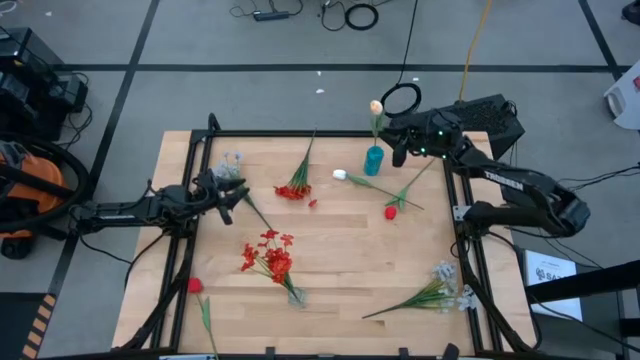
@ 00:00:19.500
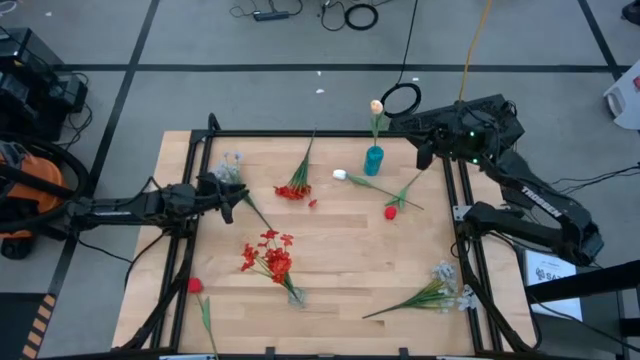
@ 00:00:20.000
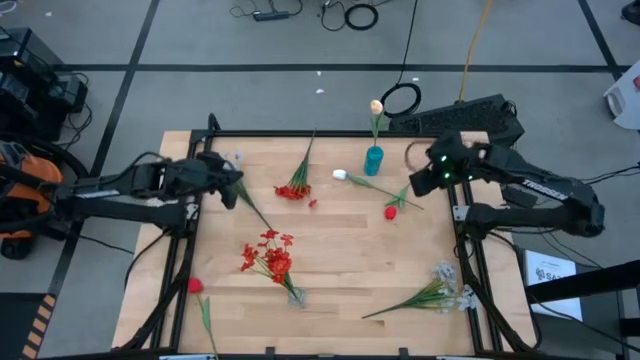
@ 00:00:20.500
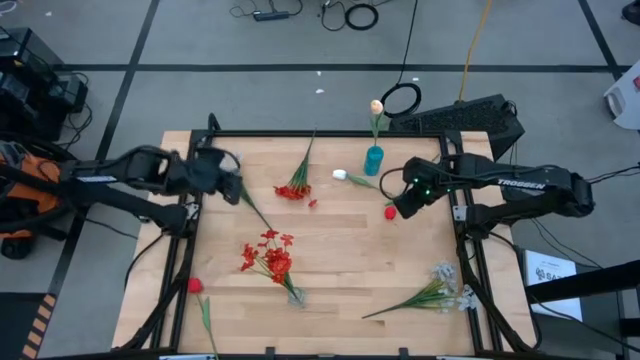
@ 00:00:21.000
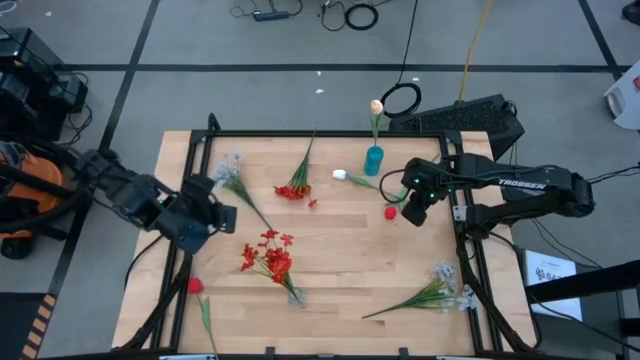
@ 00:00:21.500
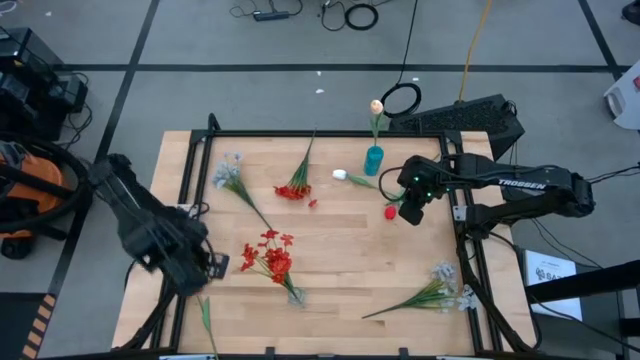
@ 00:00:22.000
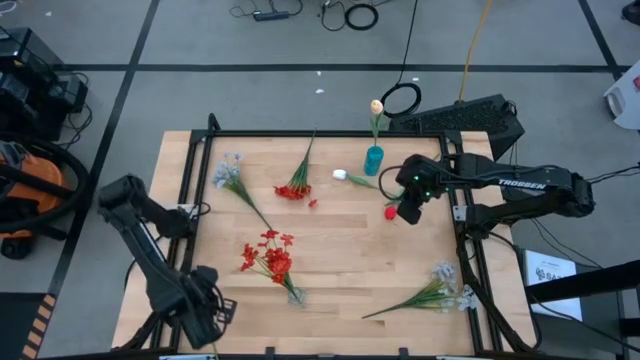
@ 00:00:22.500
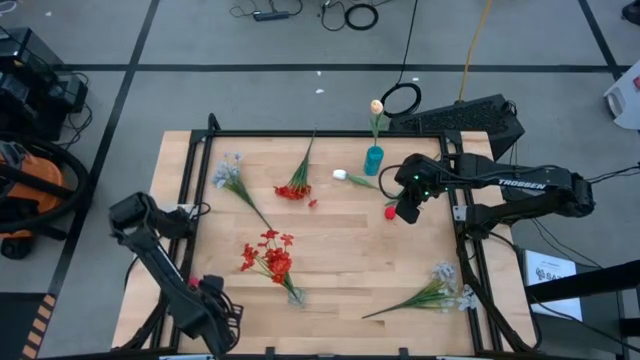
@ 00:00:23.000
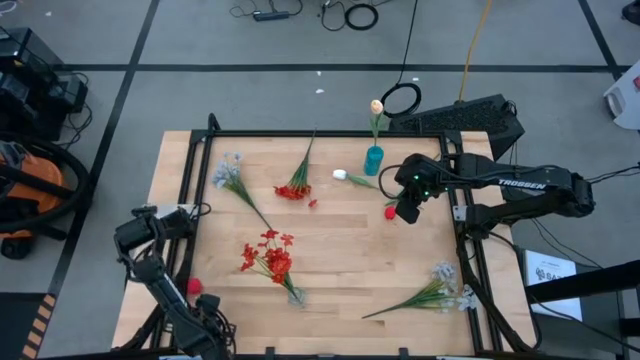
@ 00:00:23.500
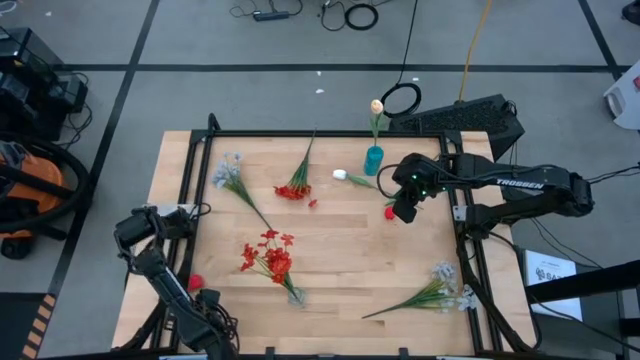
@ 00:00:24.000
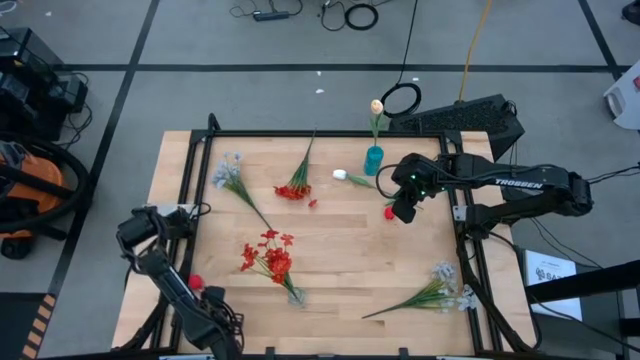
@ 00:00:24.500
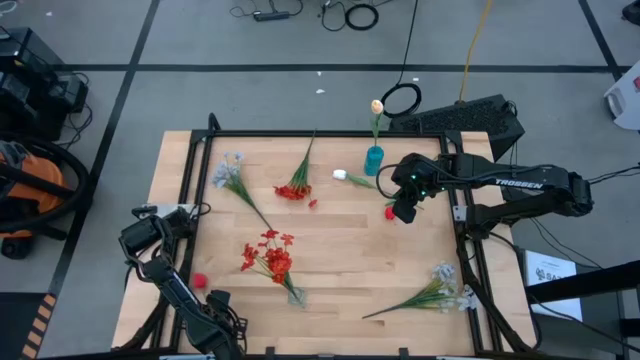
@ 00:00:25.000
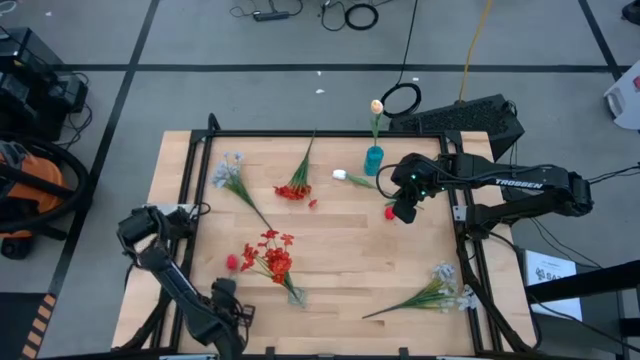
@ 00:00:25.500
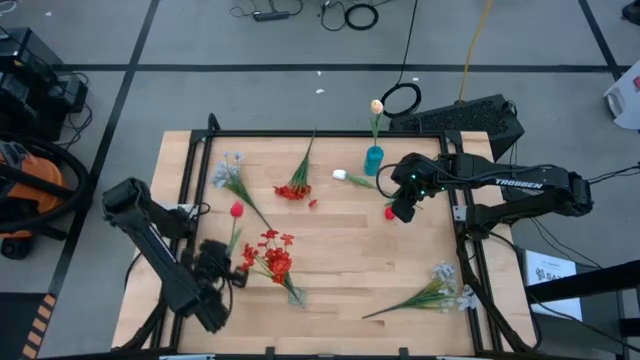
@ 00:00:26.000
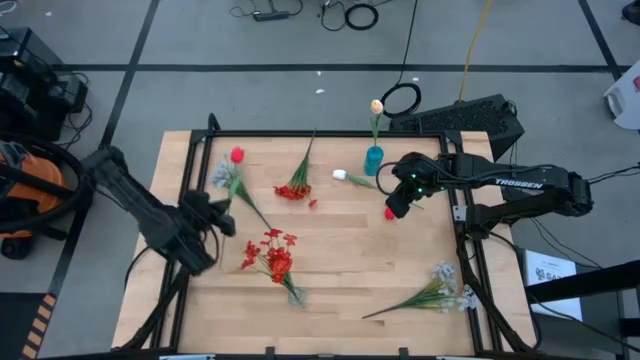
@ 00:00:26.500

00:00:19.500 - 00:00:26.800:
Task: Sort flowers into vase by color
Put the bottom red flower into the transparent vase

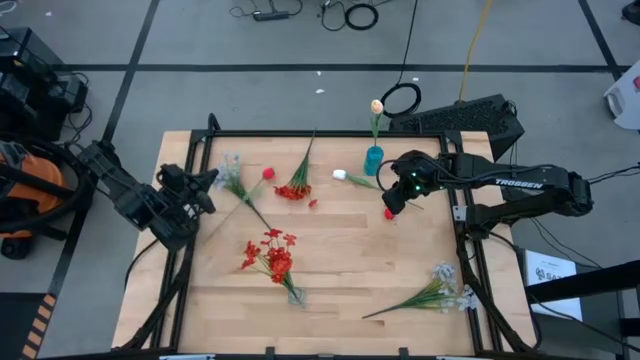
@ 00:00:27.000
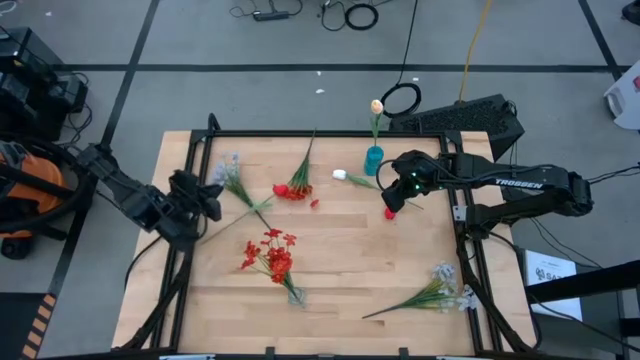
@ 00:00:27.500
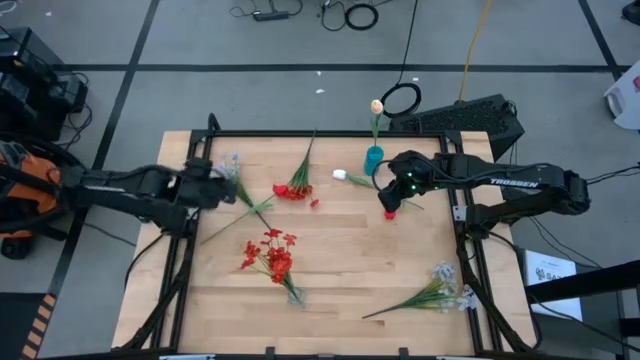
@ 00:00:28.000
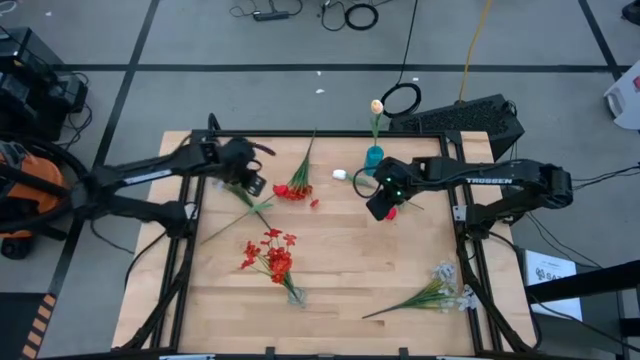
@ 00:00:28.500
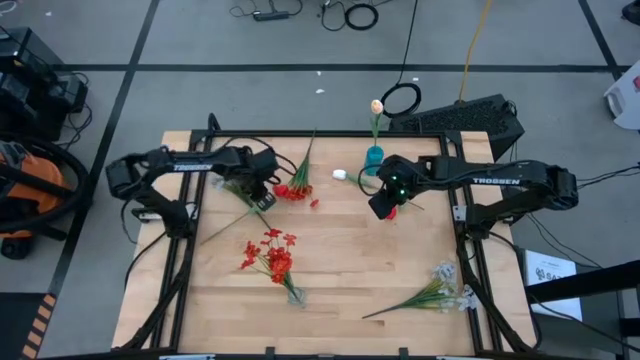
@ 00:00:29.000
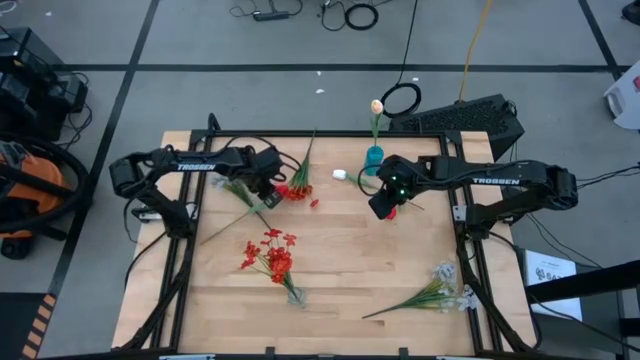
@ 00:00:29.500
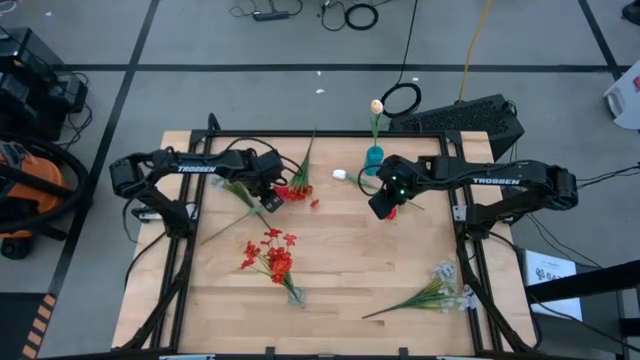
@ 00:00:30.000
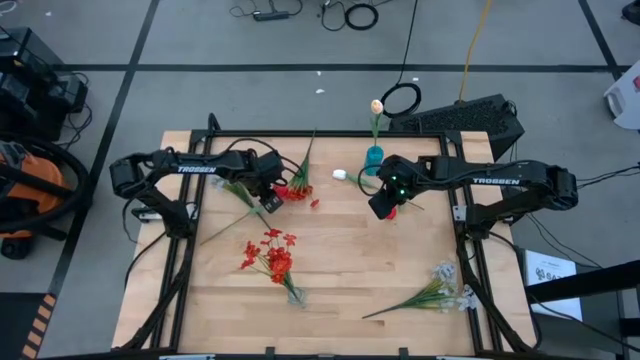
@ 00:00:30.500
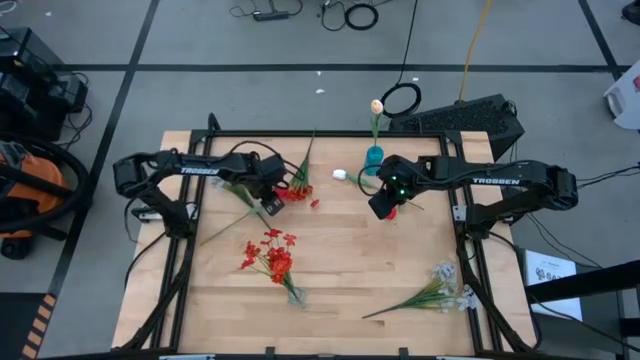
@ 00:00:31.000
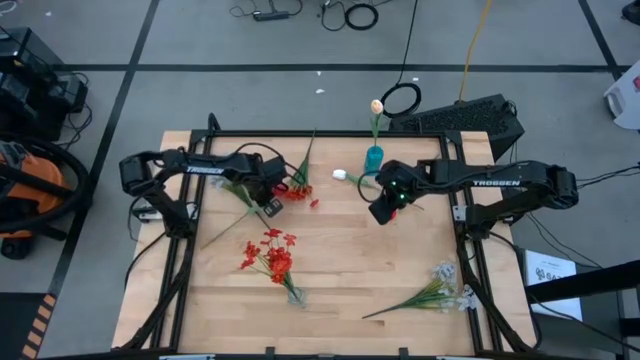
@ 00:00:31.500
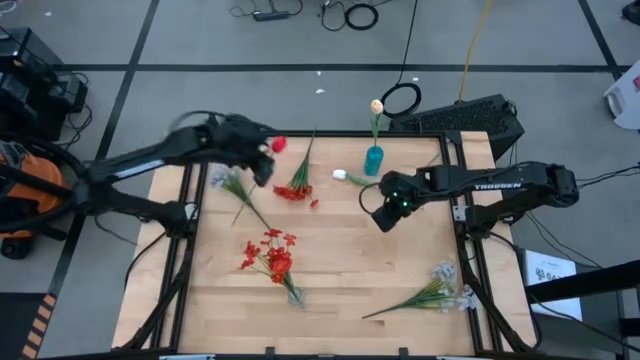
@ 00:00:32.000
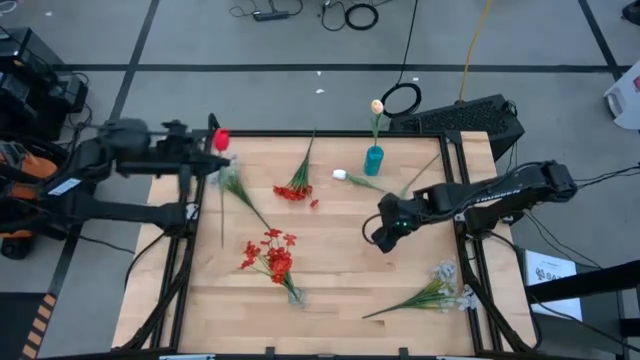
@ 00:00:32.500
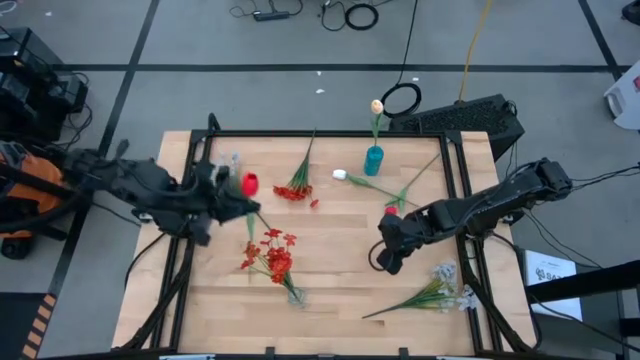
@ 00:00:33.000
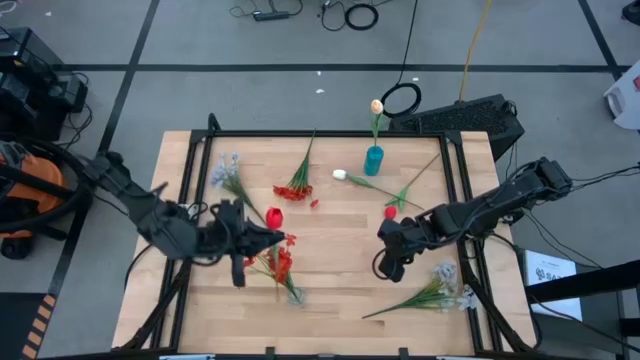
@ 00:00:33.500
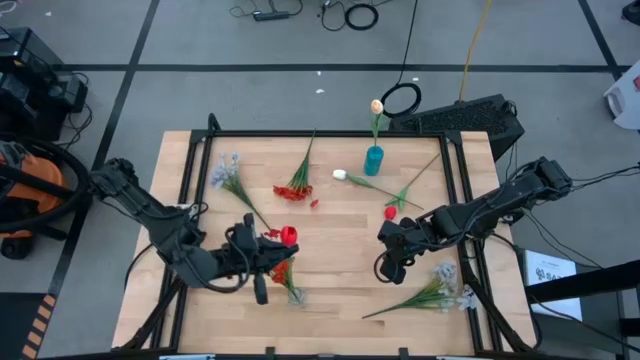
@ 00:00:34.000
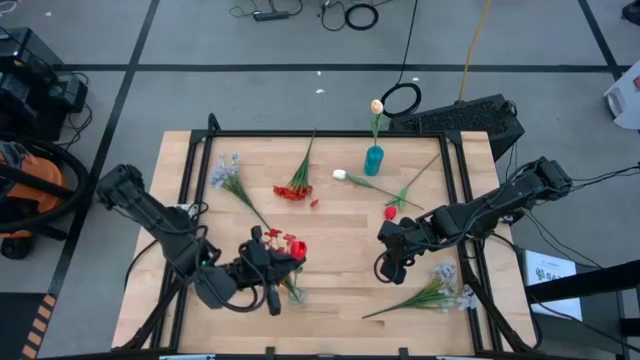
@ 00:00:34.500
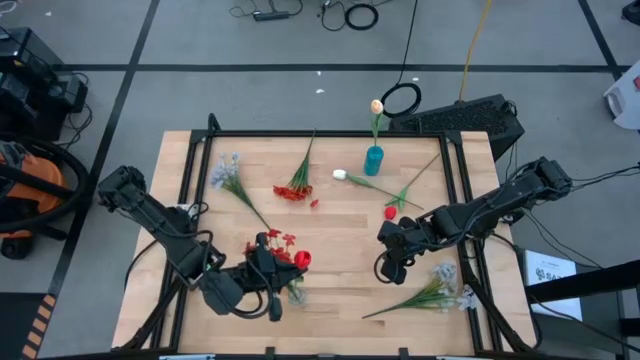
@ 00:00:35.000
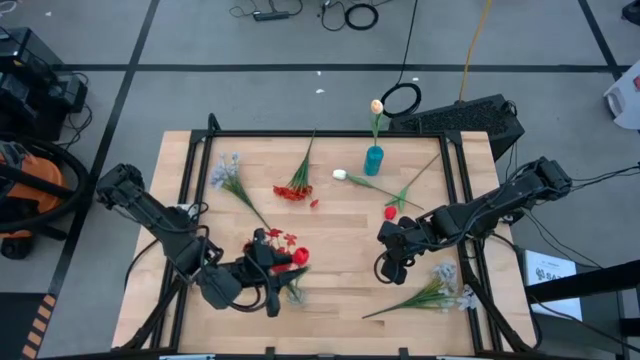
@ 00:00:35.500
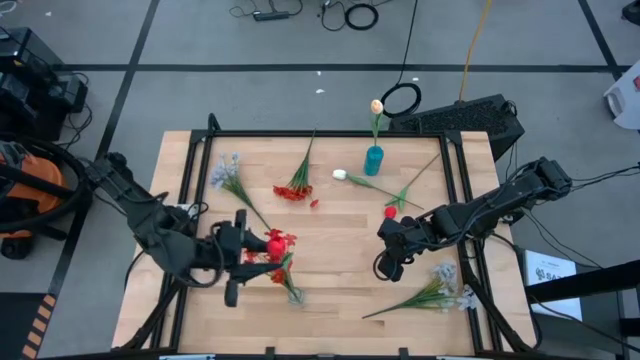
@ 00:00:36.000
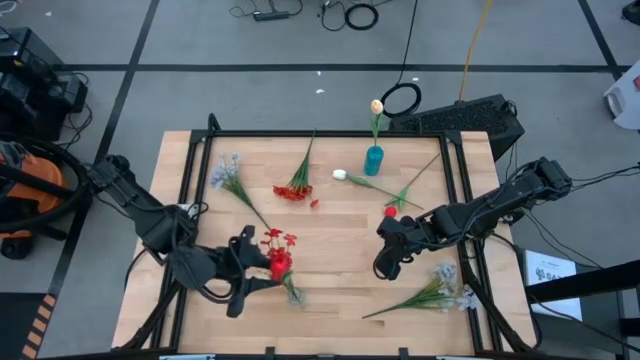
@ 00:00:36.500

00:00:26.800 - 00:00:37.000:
Put the bottom red flower into the transparent vase

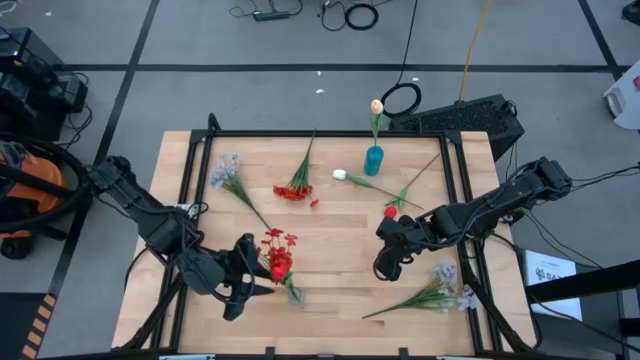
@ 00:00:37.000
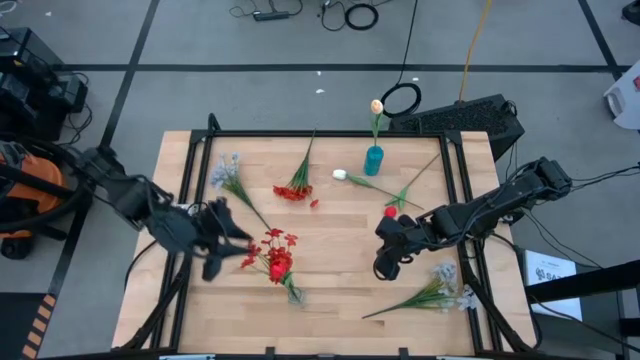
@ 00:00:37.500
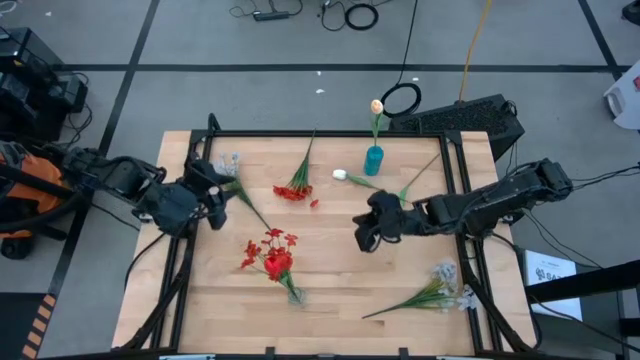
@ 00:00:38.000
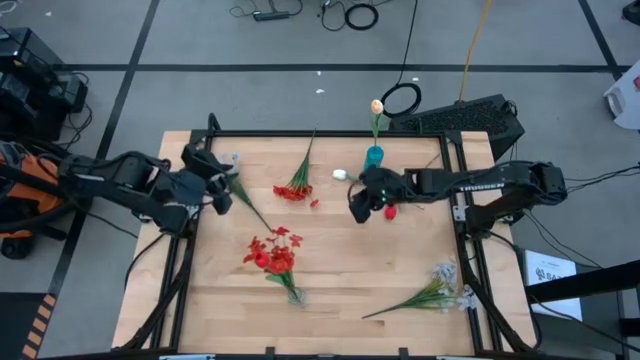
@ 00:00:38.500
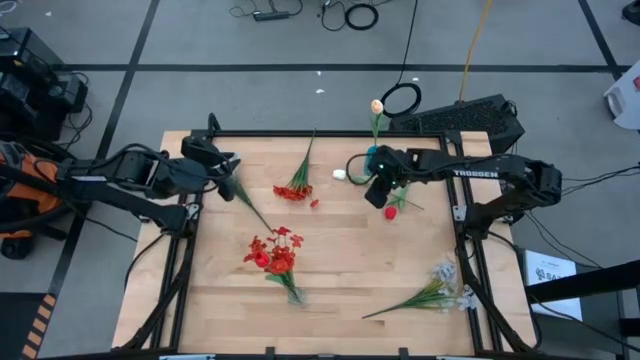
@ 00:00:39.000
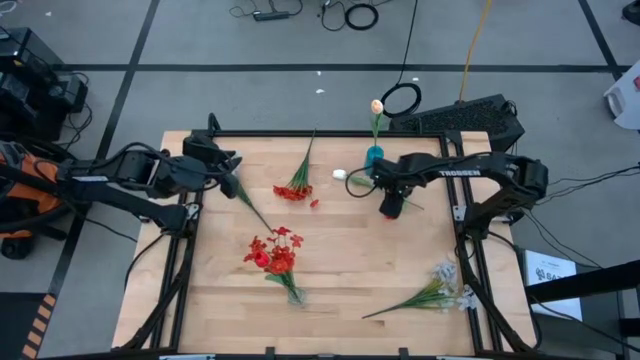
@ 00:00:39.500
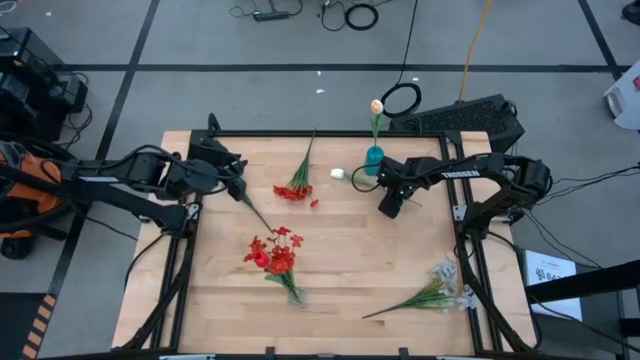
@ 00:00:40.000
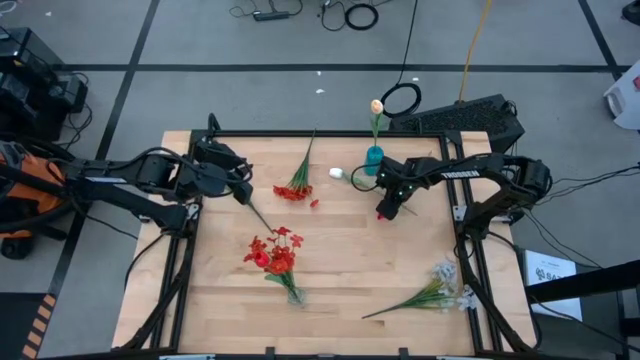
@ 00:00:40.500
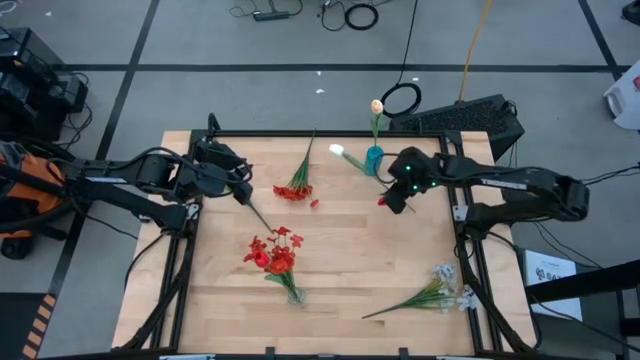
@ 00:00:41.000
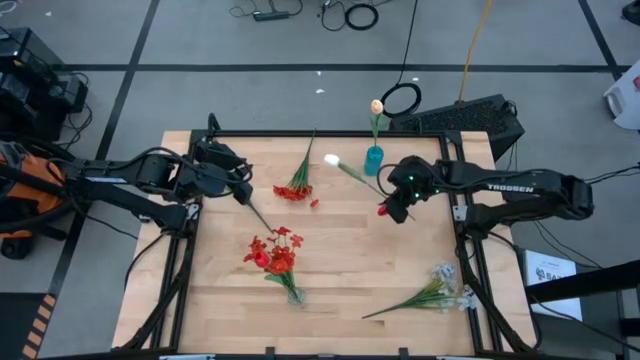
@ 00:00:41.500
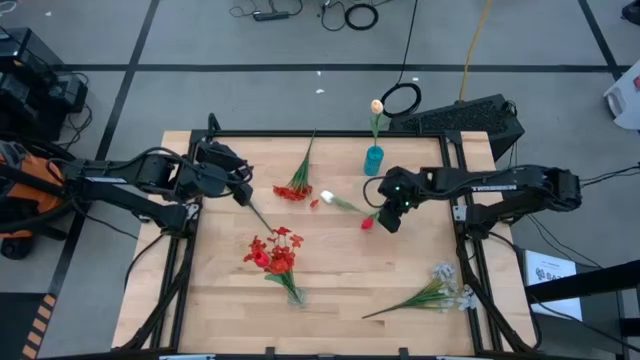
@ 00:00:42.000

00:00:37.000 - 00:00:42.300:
Put the white flower into the blue vase
